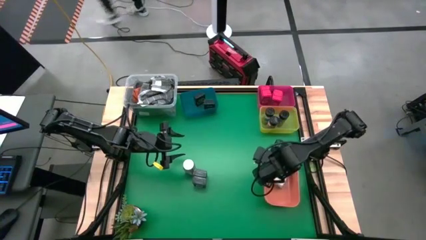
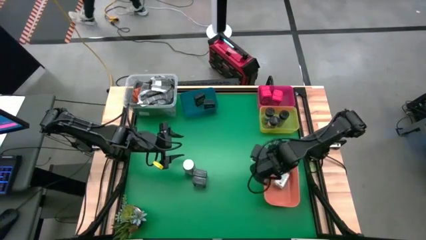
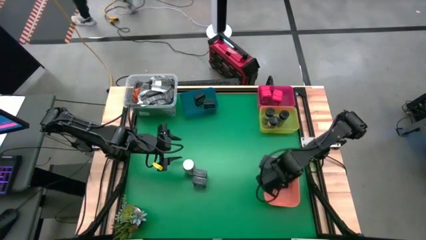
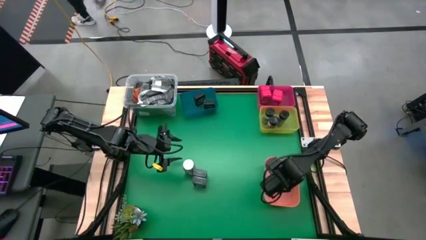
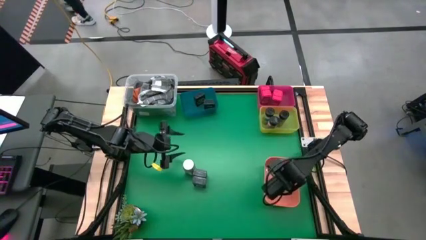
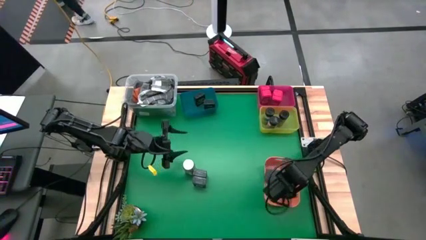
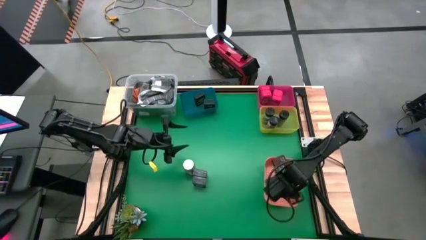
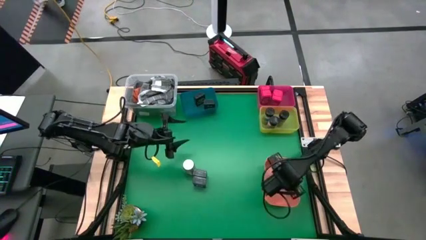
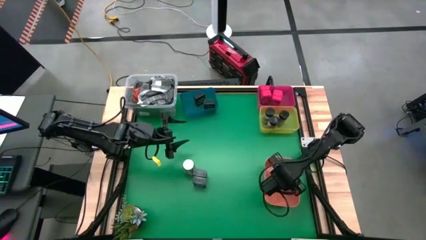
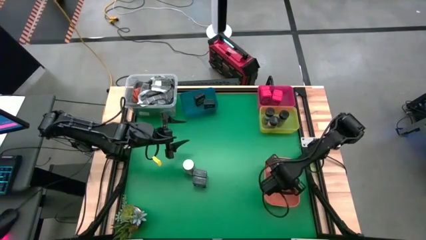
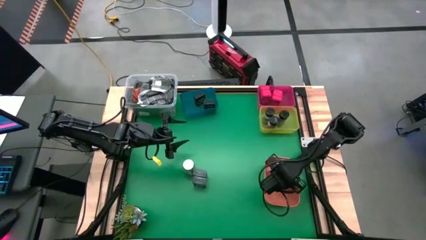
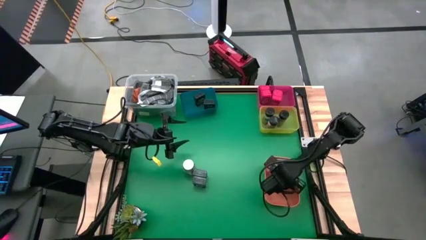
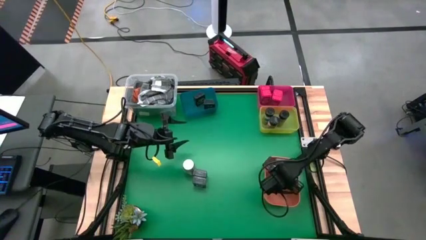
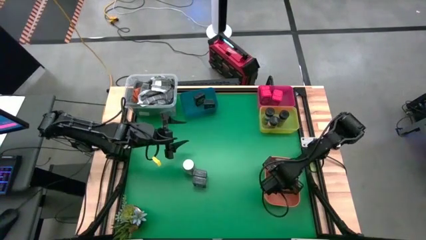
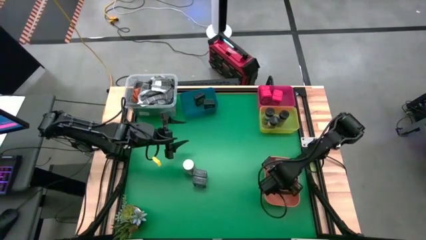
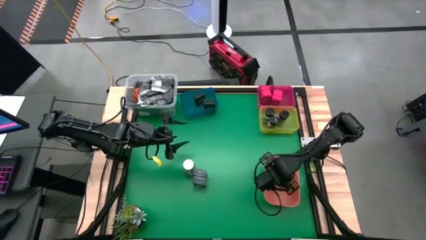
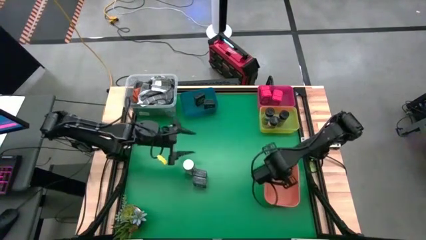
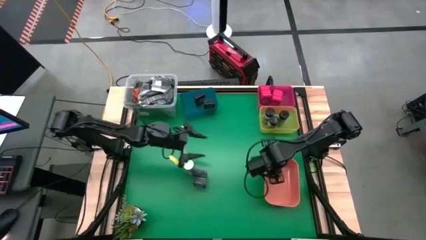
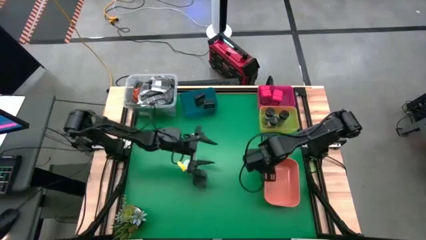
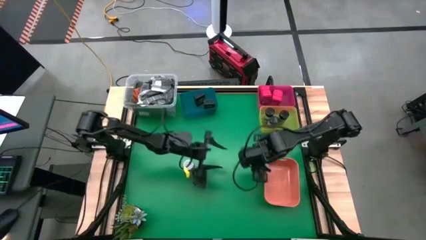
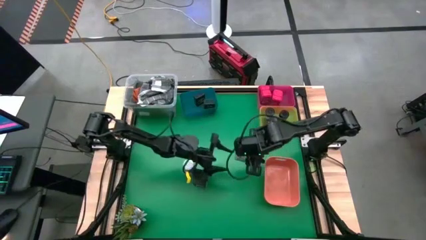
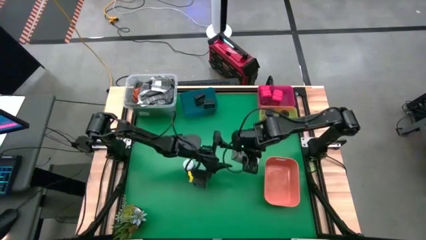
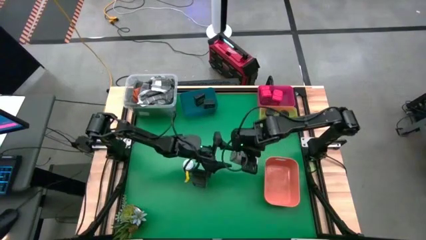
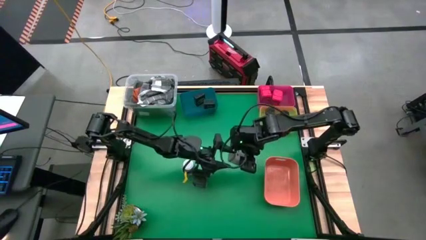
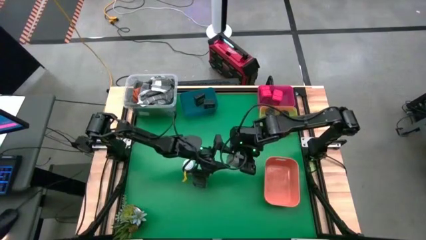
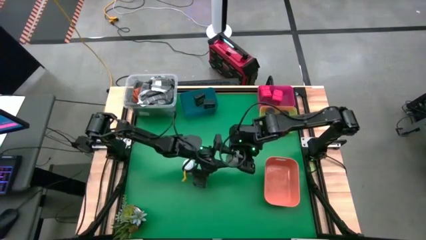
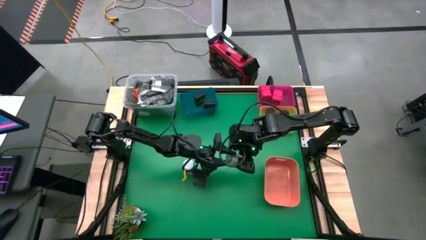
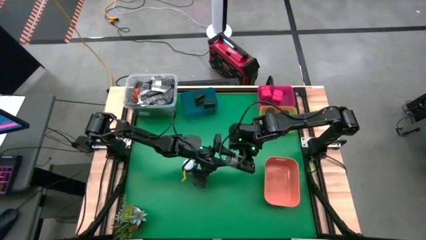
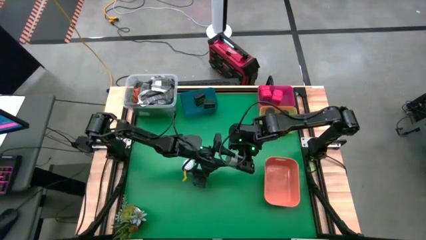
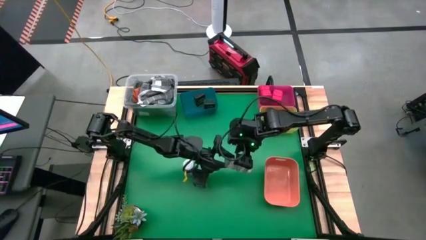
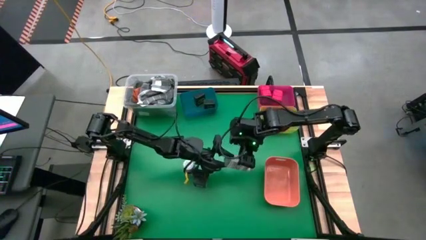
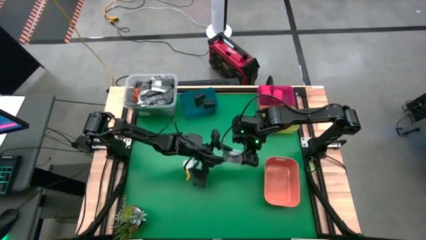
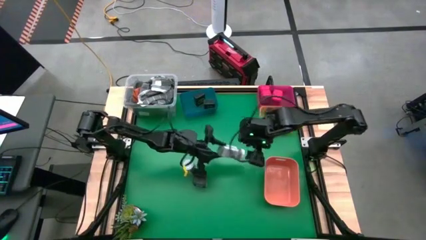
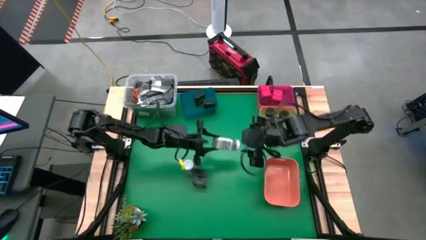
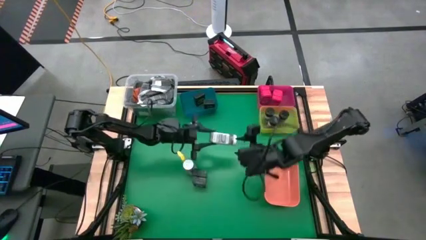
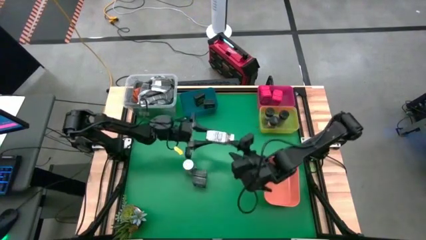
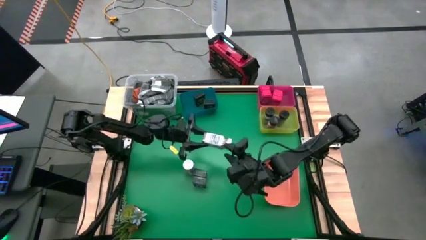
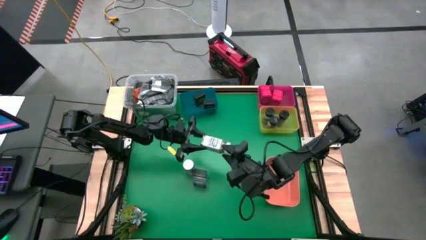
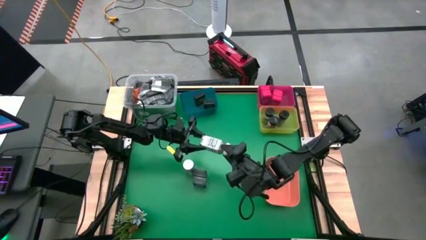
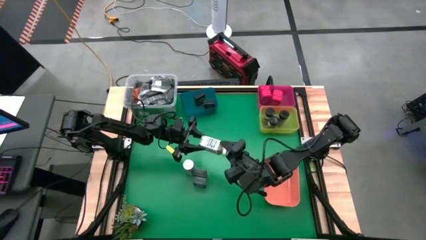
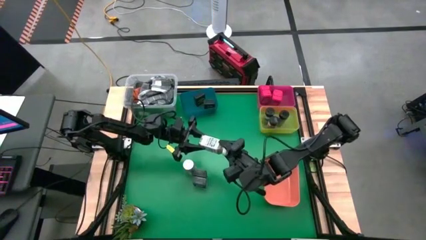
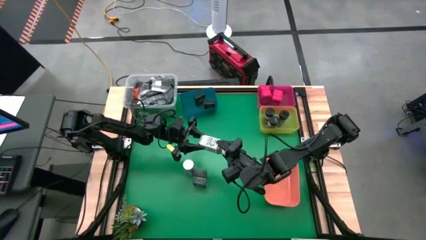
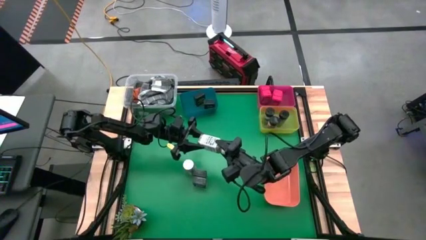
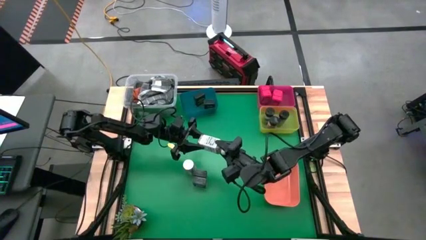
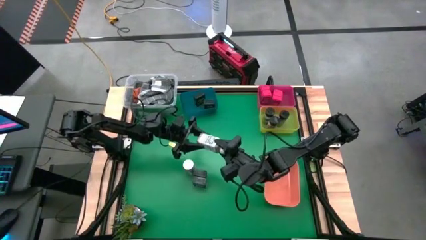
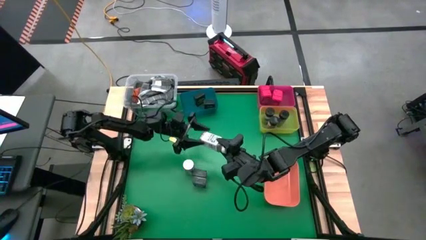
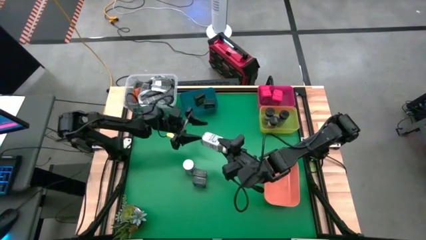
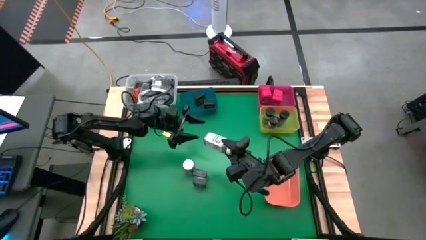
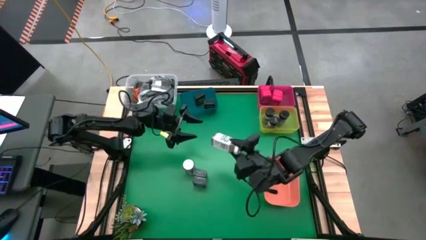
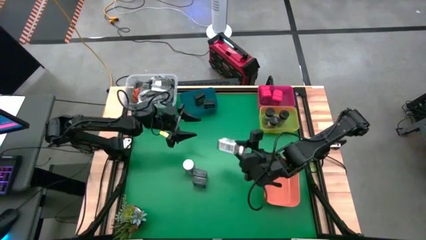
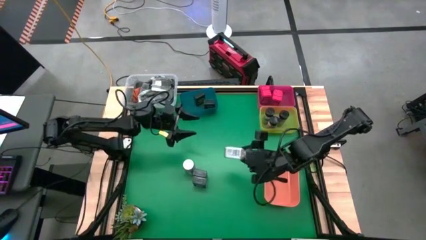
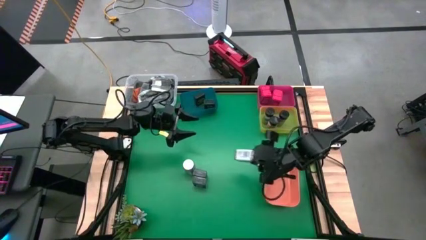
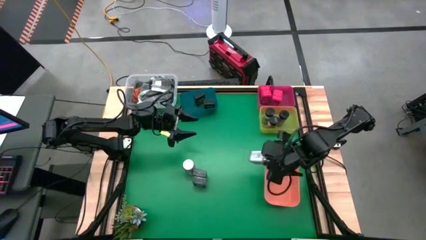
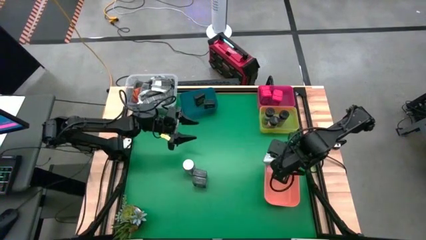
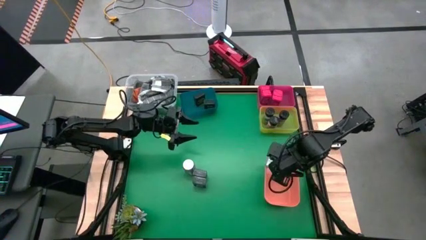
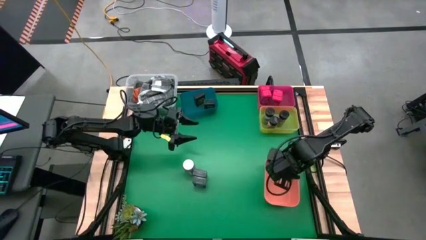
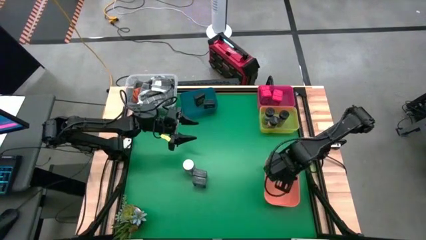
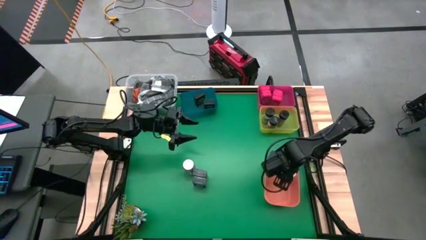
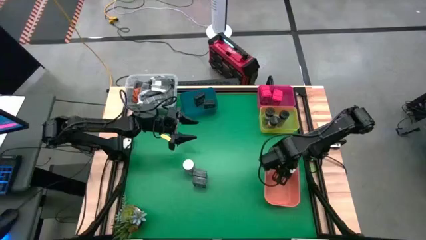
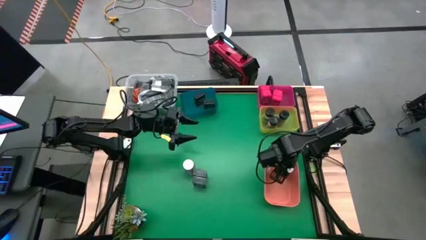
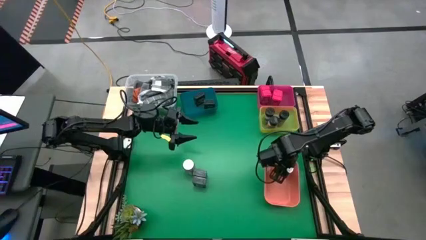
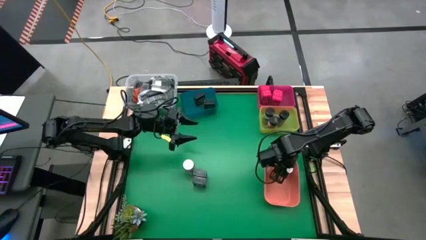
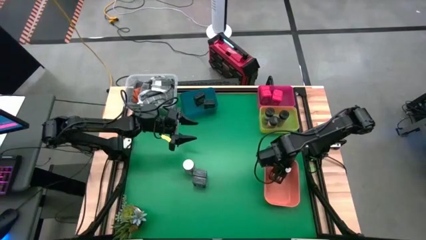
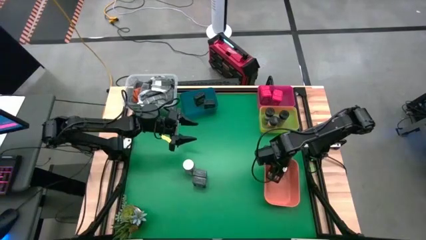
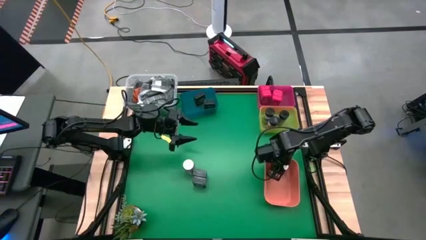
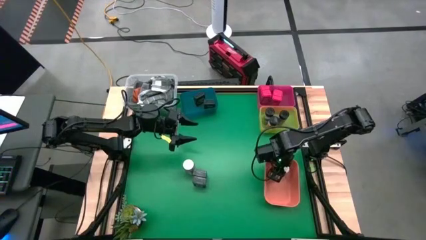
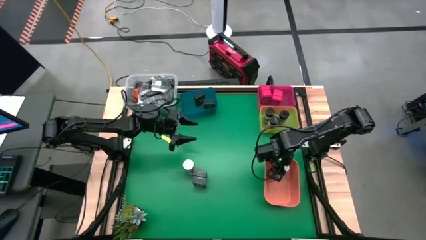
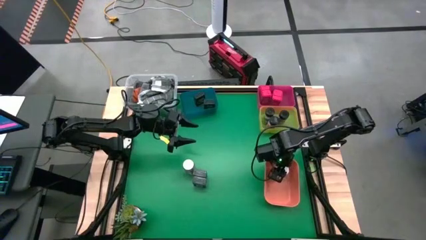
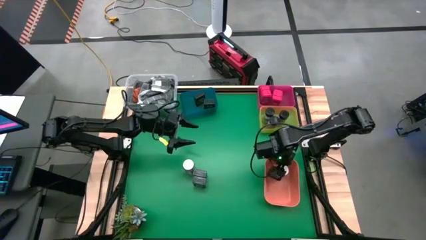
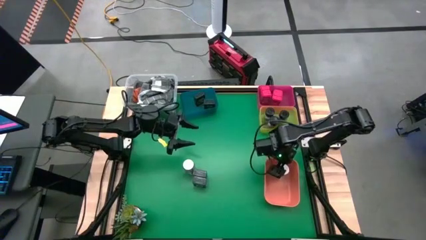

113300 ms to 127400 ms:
Task: Sort spices by type
Put the white seasoning into the orange bin
